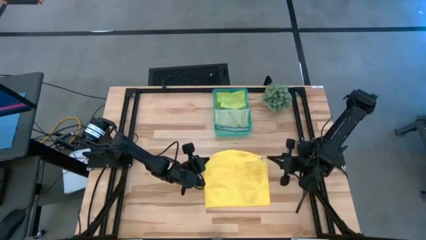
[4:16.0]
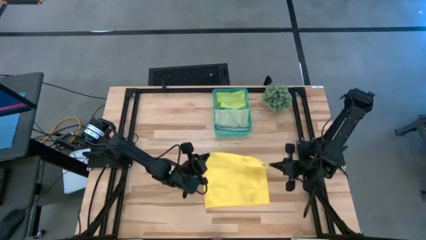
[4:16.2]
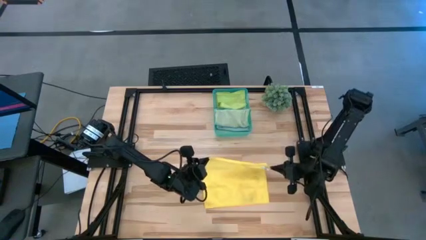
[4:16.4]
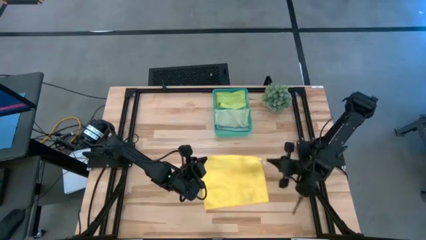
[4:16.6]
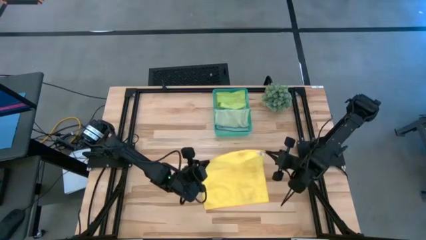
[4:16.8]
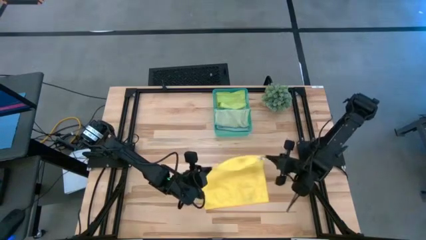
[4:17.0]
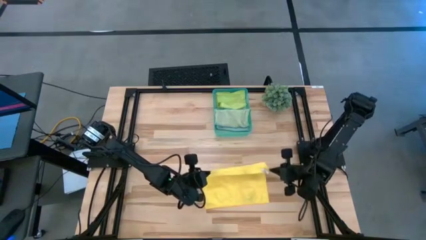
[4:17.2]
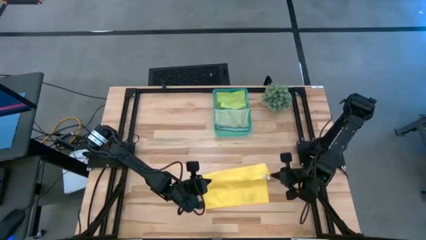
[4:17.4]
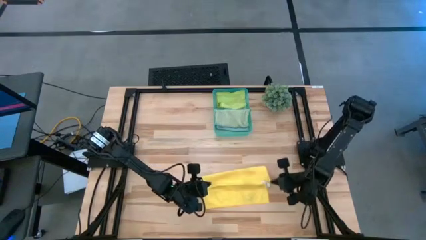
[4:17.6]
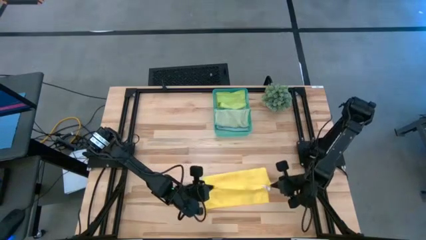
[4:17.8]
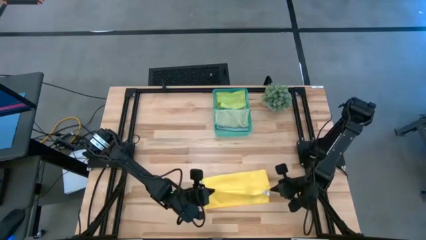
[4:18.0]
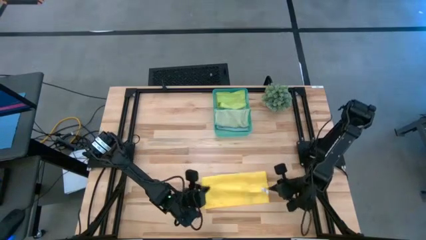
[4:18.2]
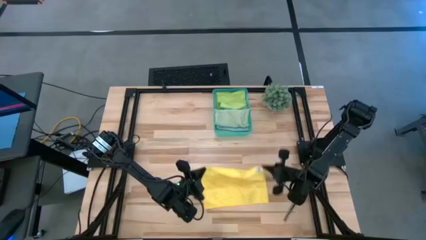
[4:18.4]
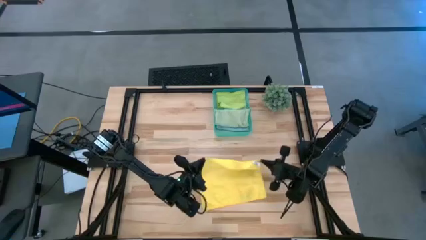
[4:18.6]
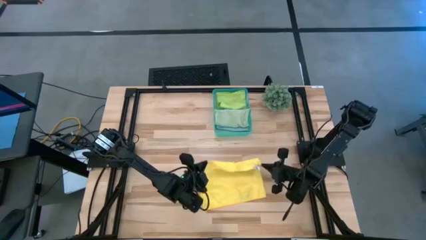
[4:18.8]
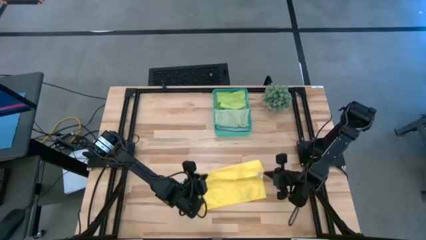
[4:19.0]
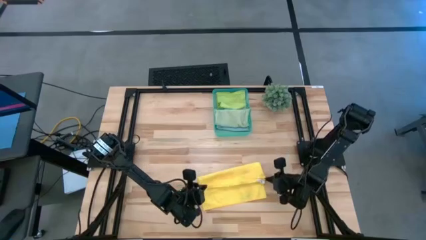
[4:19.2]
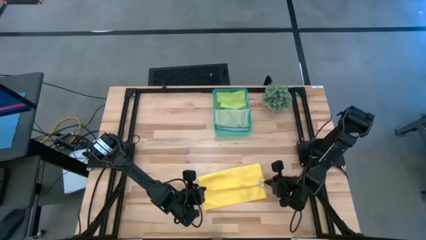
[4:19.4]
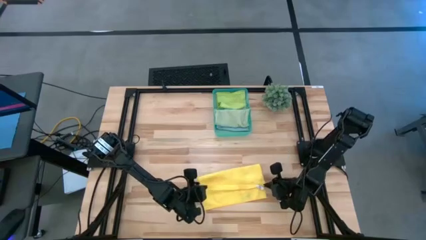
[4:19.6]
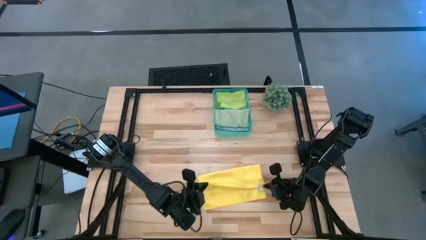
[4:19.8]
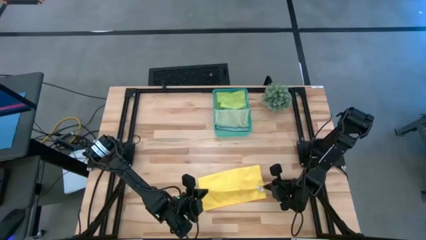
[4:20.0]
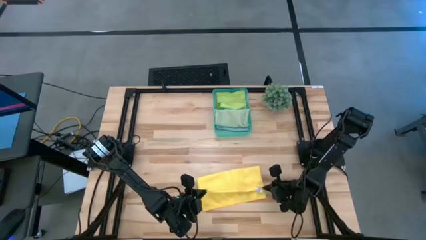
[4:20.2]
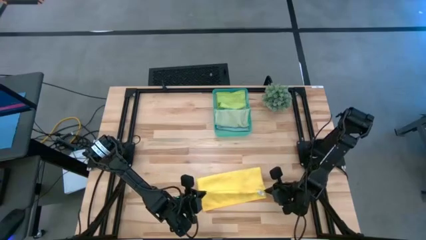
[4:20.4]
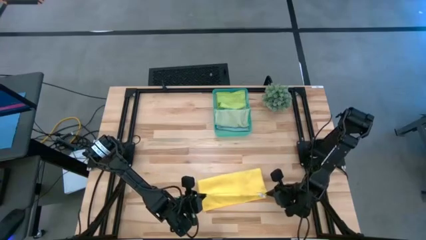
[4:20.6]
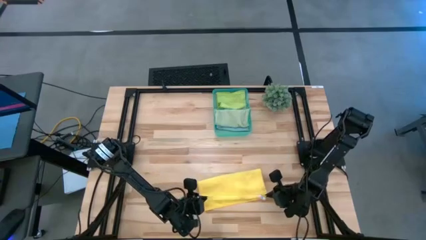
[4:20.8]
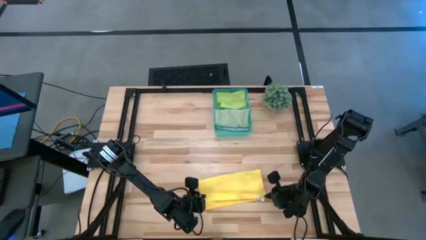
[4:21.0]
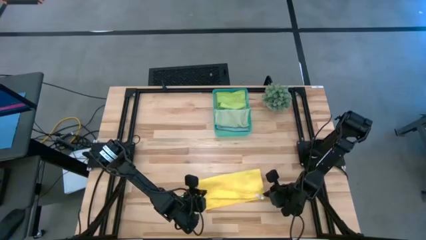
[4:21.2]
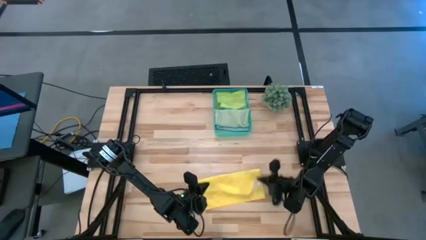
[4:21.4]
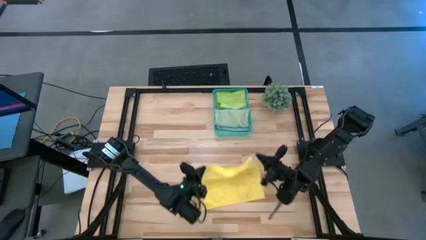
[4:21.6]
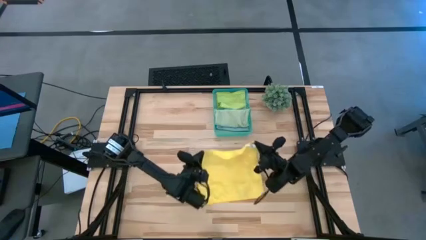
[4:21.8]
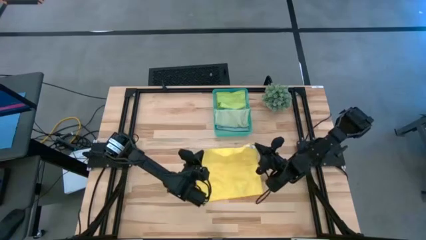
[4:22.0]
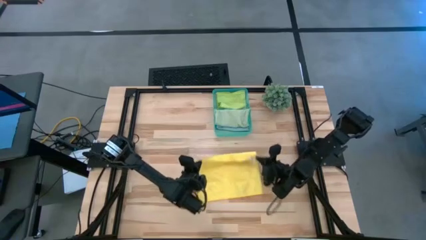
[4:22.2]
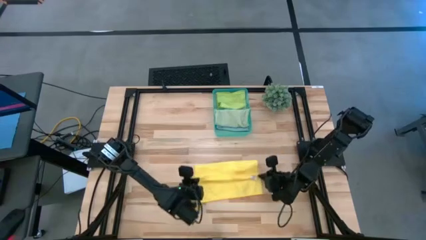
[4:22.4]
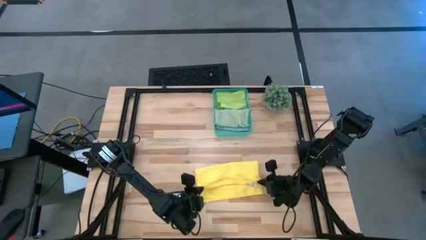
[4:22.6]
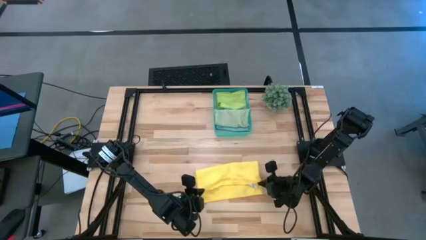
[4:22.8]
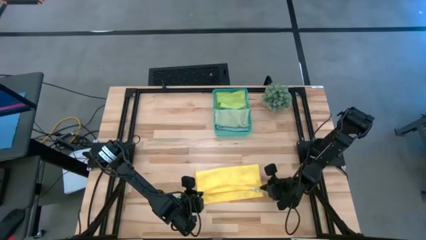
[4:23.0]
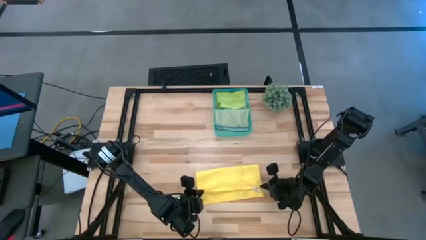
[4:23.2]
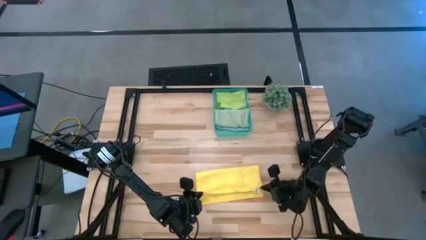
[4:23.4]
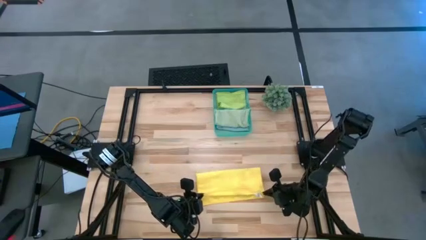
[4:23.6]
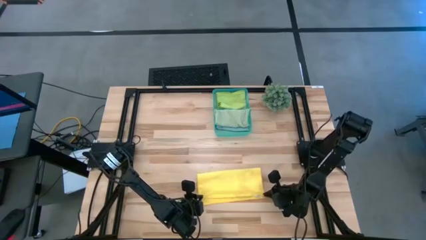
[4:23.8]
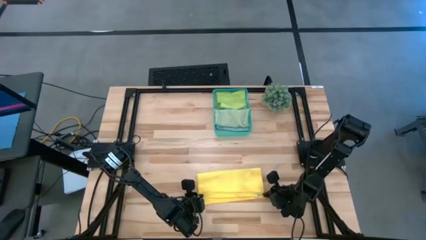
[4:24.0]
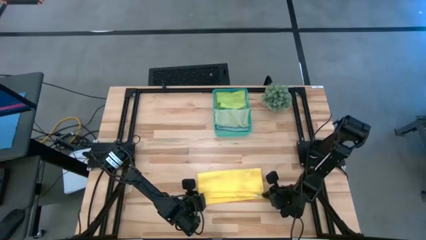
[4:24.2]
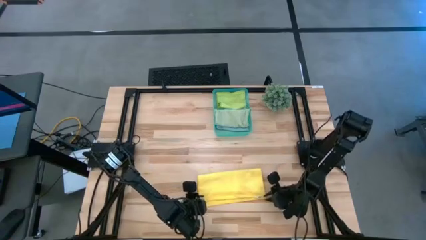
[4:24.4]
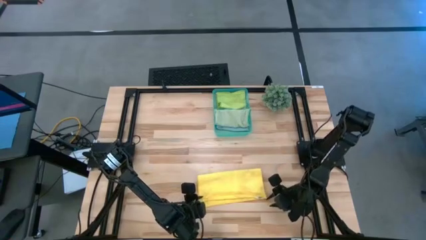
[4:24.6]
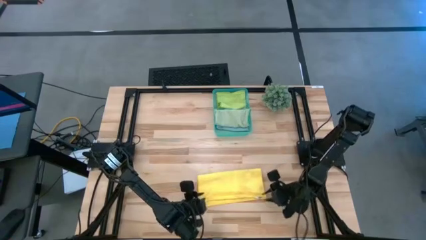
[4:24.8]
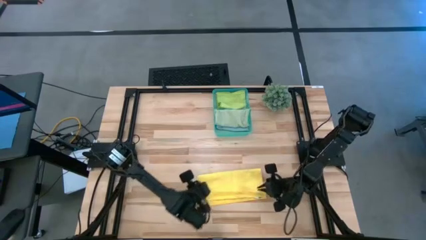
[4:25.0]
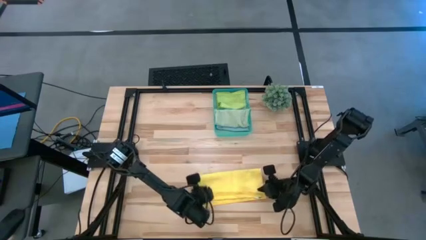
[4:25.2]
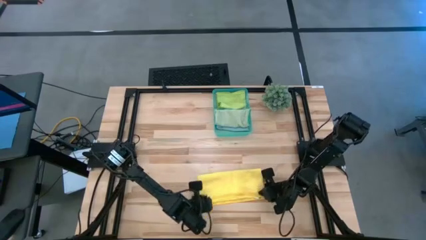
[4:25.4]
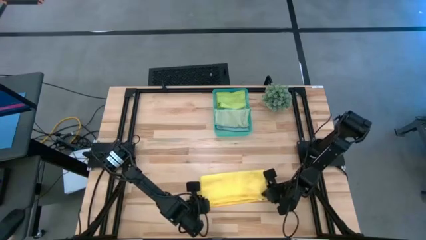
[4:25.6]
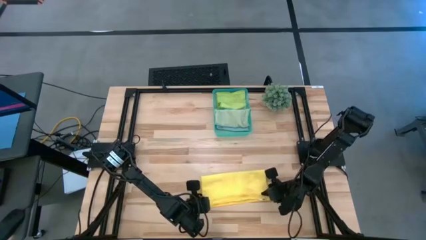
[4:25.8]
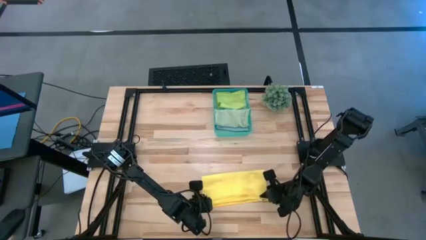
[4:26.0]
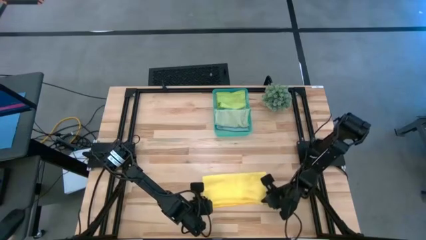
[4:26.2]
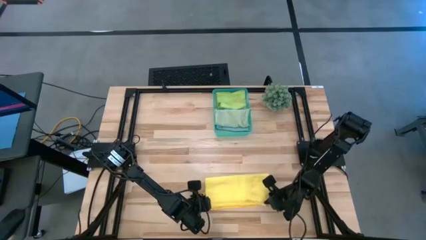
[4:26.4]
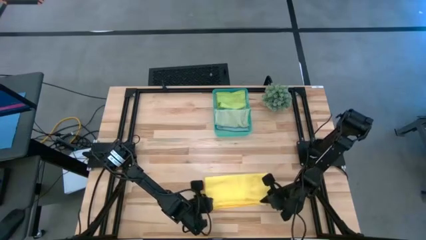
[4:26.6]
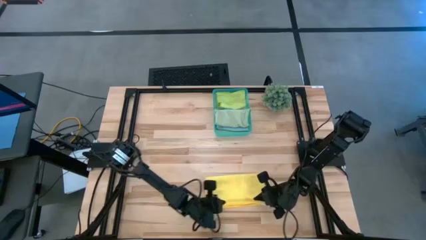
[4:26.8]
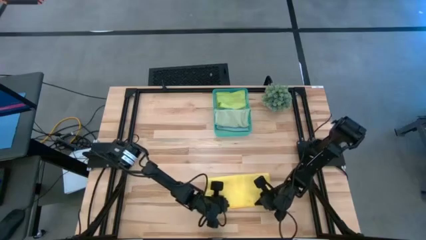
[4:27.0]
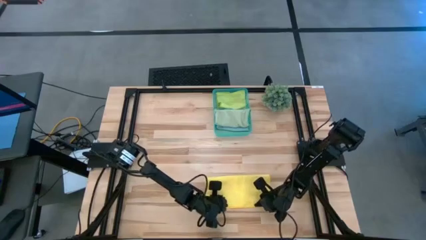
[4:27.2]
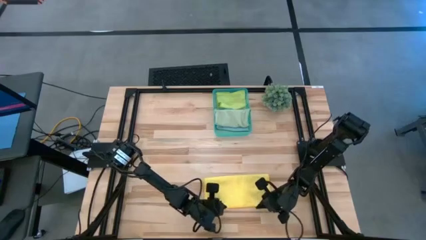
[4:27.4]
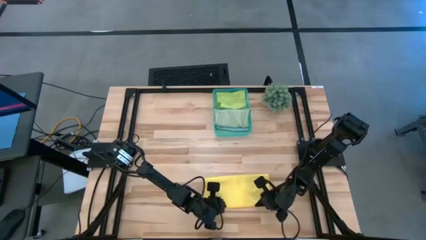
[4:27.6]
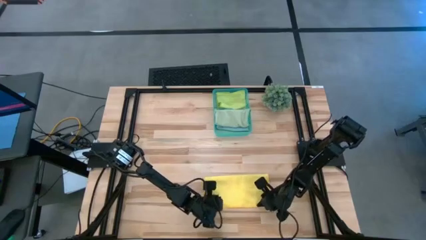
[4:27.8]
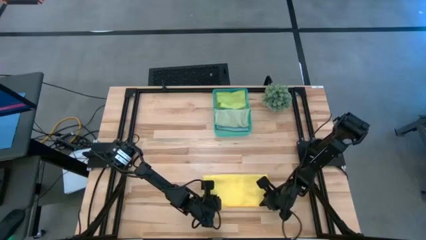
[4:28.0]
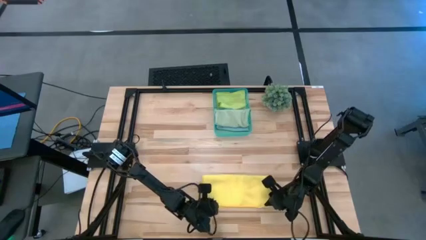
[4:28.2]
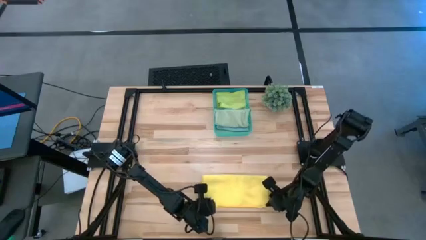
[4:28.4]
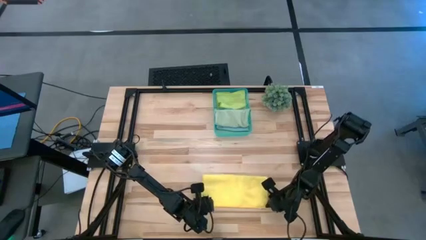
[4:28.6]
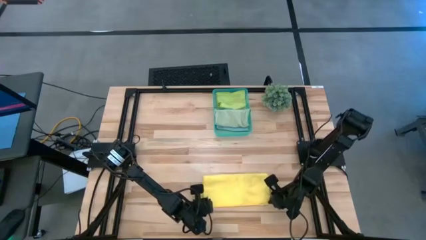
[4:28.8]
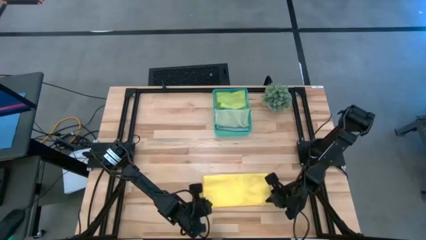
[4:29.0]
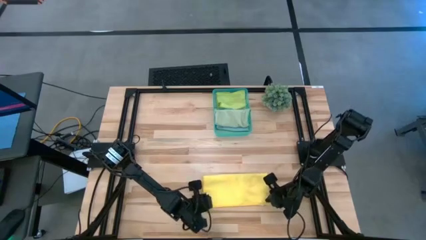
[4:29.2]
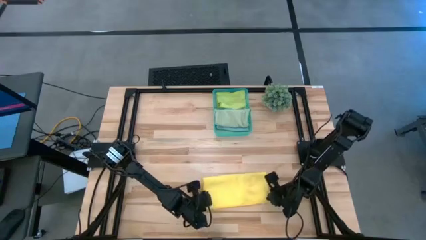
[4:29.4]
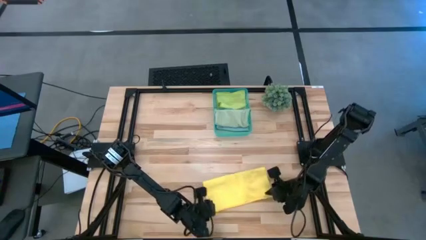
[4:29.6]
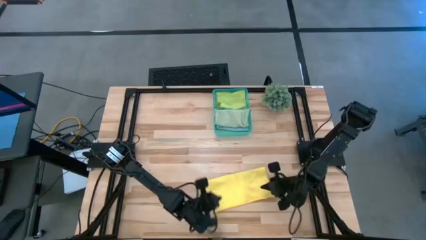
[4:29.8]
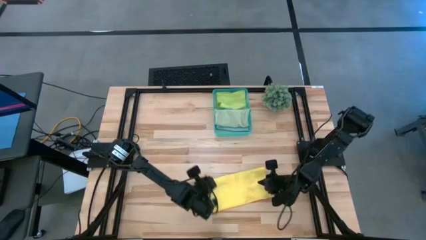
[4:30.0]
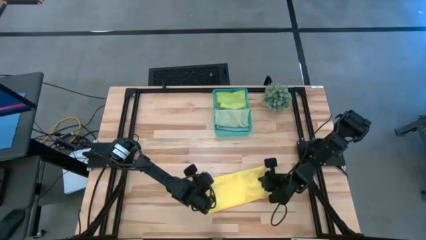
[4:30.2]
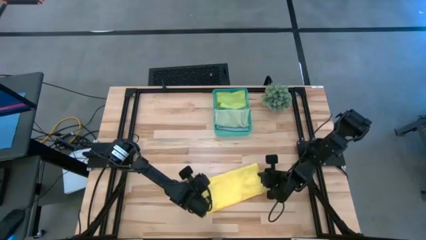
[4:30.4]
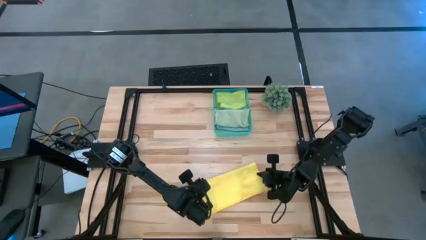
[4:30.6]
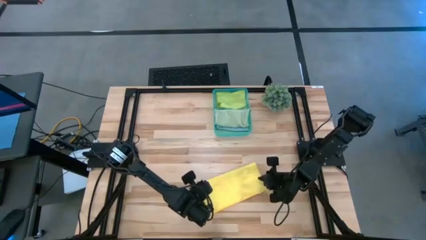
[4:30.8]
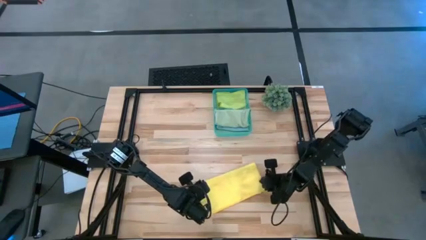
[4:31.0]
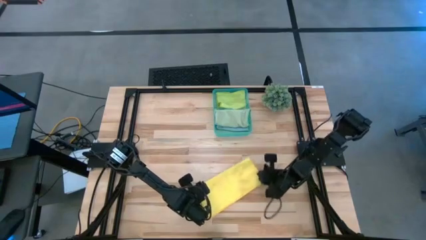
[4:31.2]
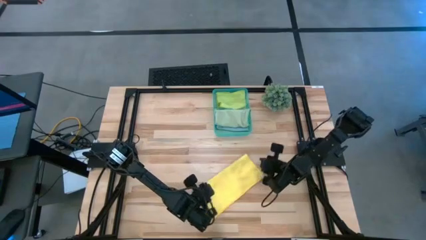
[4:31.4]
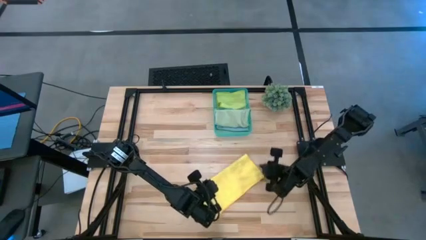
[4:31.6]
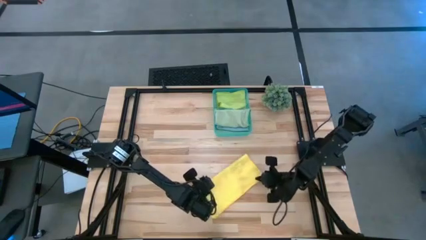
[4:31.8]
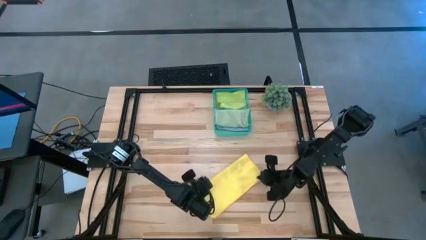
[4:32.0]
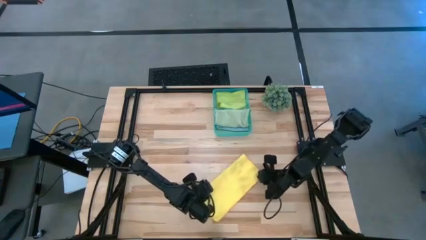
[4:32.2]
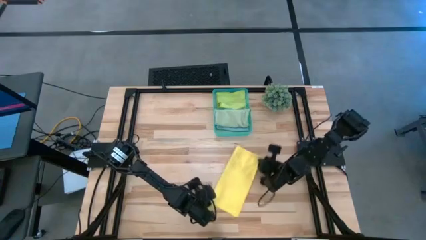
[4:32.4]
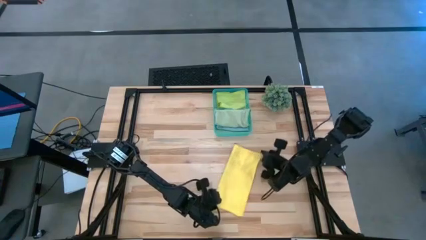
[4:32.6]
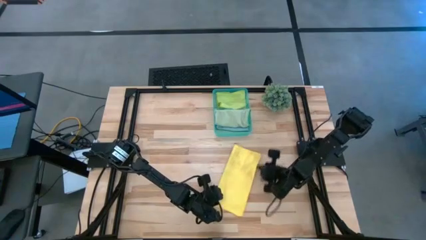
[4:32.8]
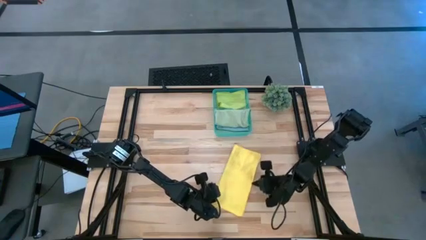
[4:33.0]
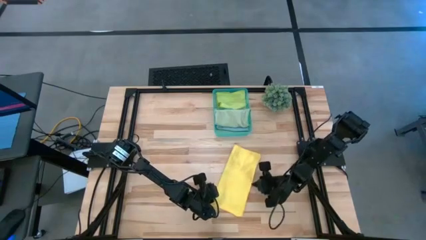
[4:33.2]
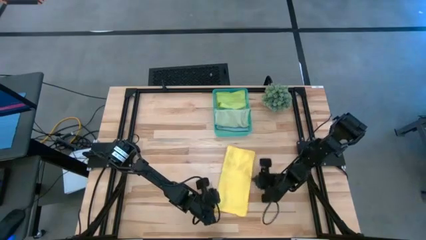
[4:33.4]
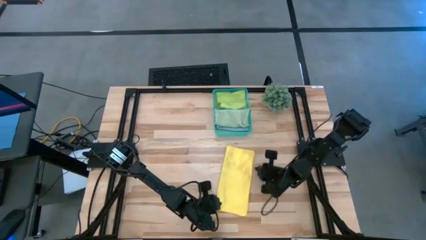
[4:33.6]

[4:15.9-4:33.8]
Task: Fold microfiber towels
Fold the yellow microfiber cloth
